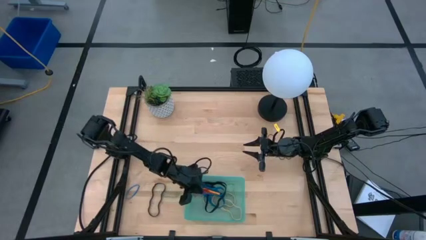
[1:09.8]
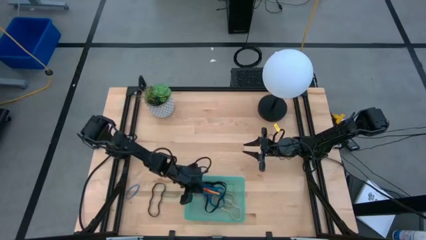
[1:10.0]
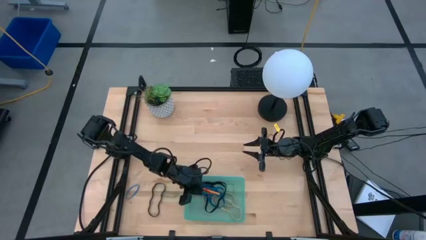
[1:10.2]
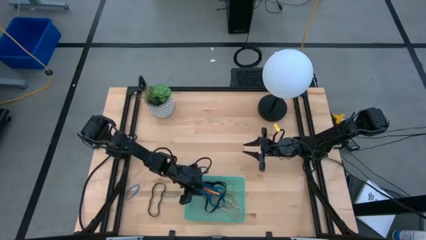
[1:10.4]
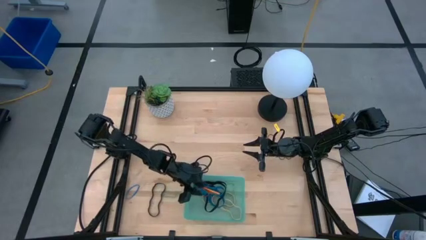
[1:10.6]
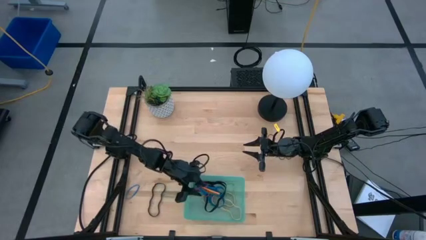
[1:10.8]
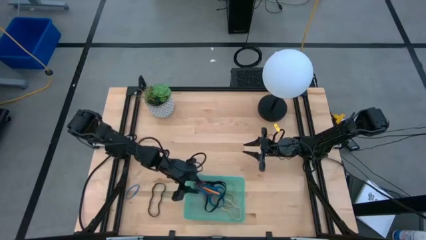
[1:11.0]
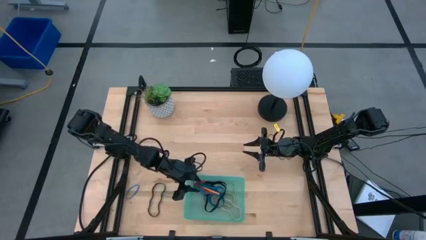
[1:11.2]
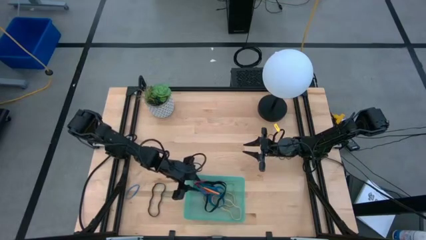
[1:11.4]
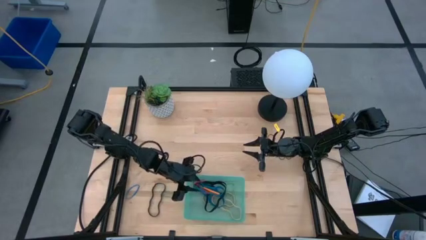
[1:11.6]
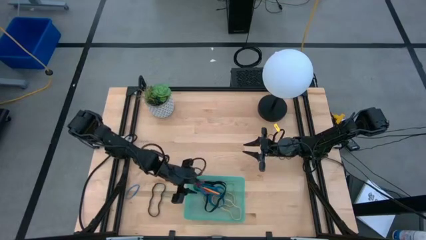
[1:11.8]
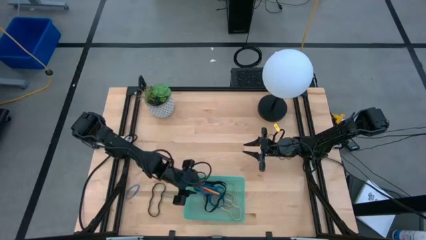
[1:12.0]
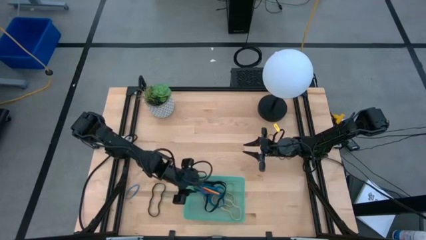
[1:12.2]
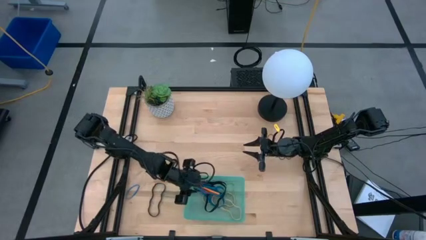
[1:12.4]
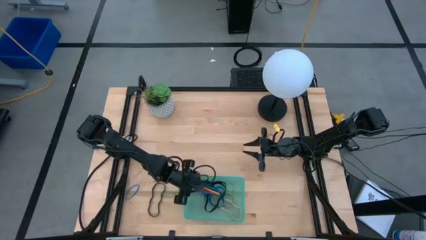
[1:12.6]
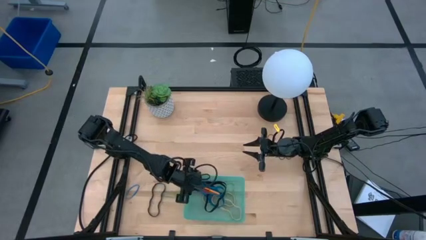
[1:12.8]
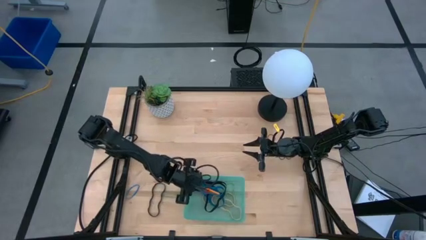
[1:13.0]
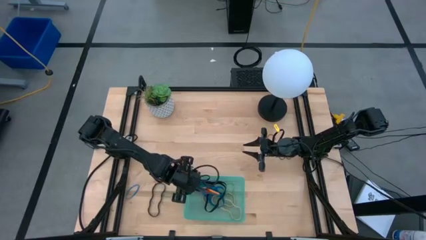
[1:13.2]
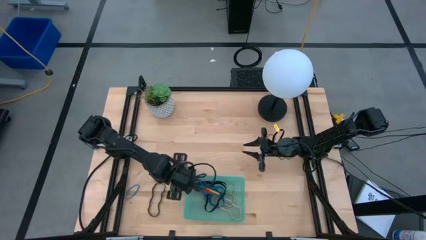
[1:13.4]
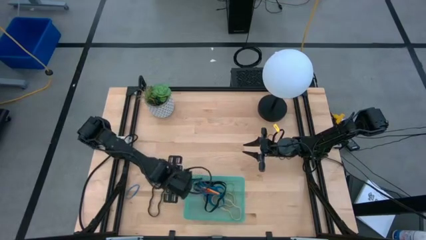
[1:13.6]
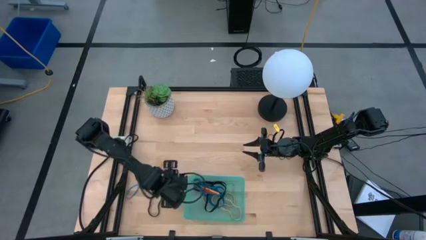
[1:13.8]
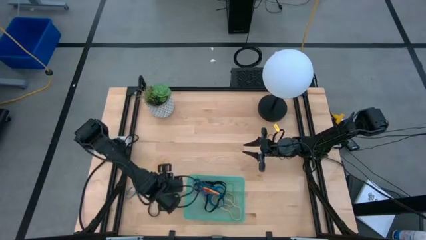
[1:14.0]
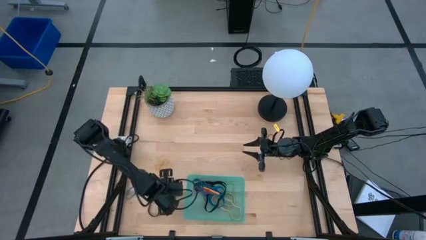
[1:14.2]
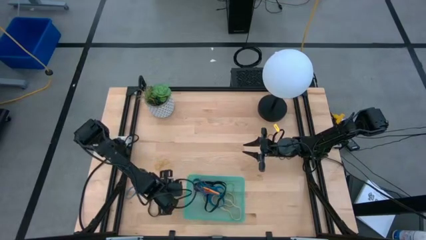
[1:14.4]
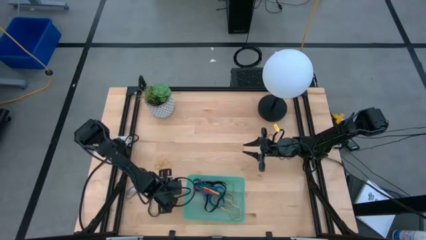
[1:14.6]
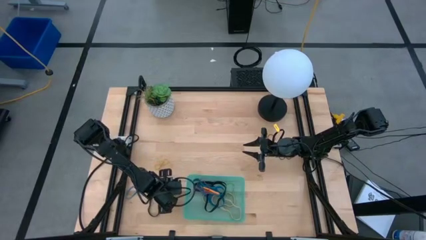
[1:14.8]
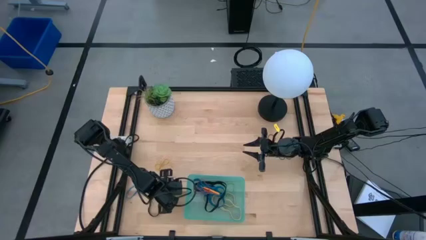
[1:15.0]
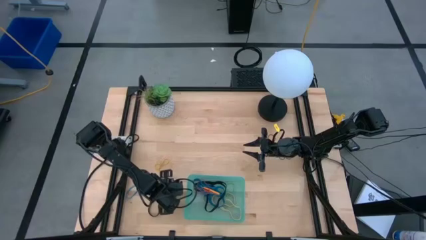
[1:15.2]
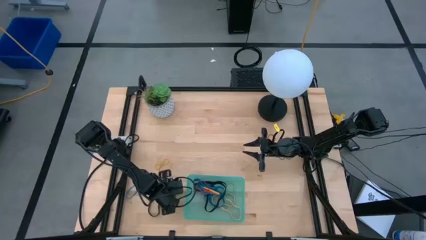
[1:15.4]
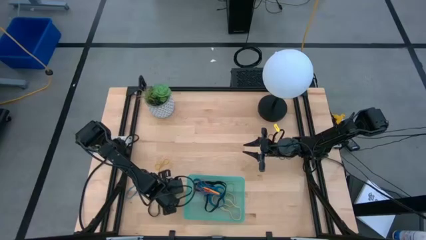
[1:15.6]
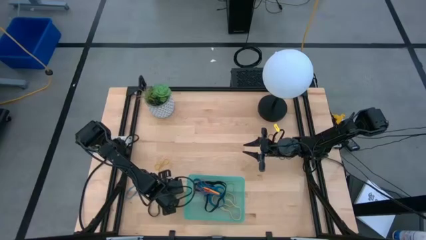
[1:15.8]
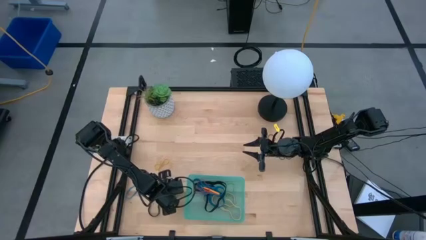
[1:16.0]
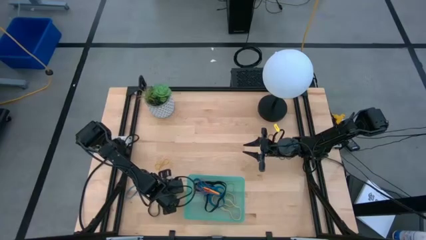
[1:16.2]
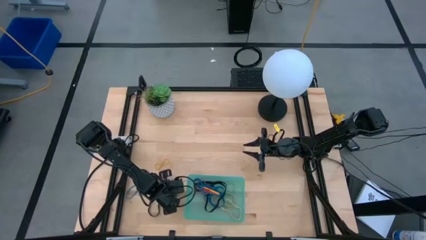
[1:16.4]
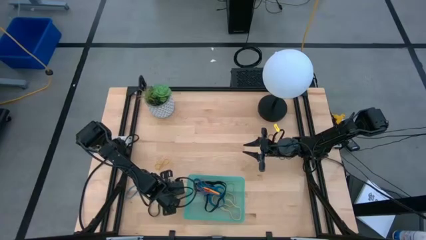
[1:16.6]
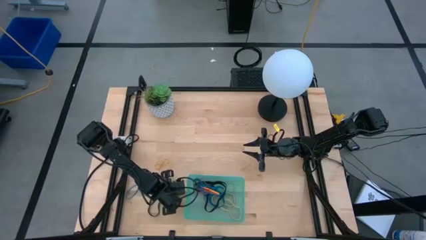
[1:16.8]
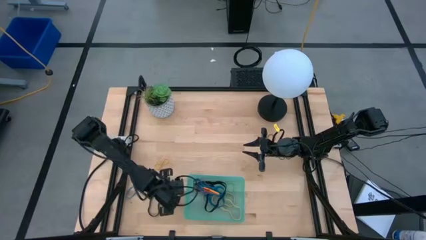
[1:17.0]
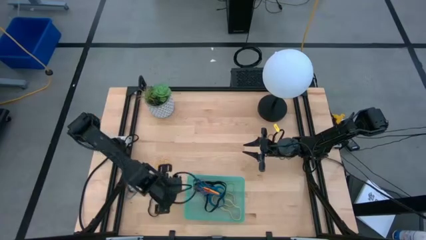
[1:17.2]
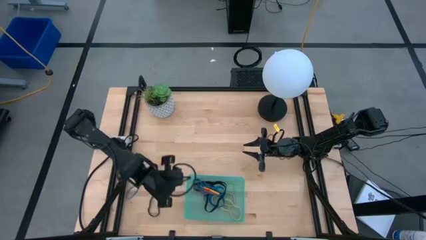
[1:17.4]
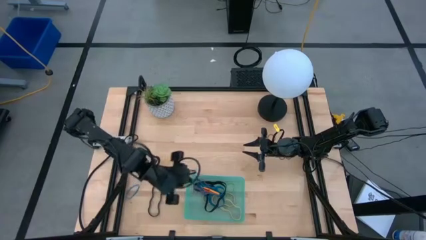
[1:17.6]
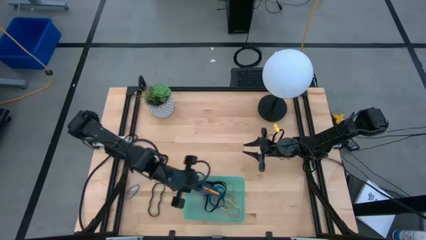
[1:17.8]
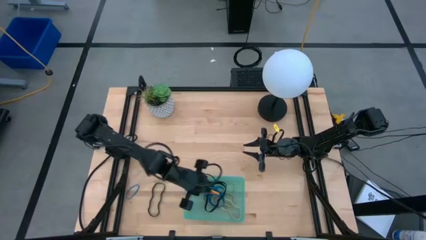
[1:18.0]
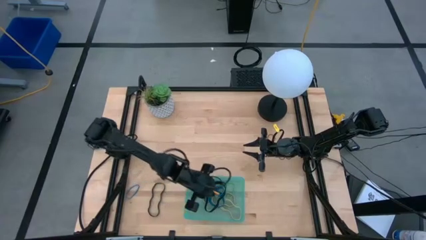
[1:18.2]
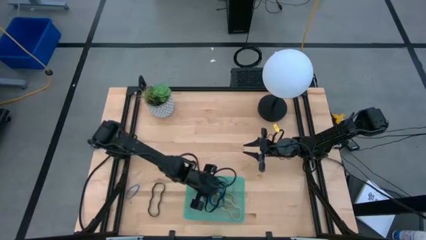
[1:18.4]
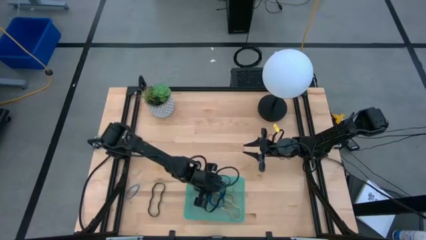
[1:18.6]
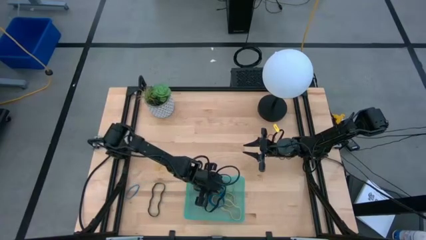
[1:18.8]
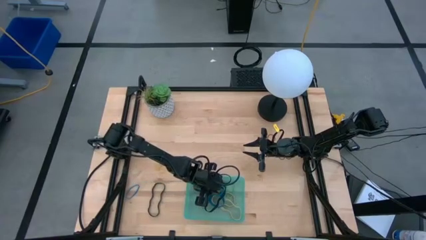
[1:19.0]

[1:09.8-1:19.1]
Task: Pick and place rubber bands into bin
Put the small green rubberband into the green bin

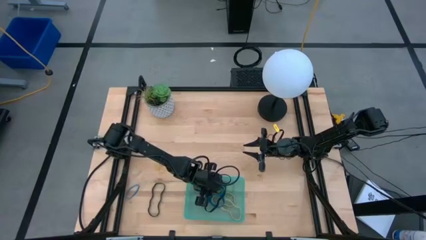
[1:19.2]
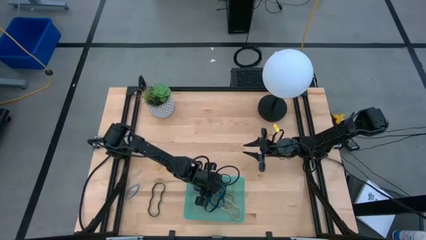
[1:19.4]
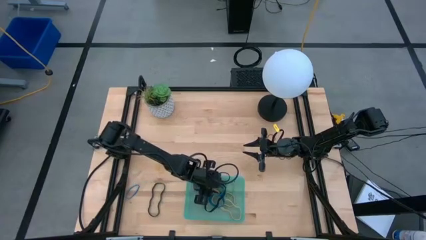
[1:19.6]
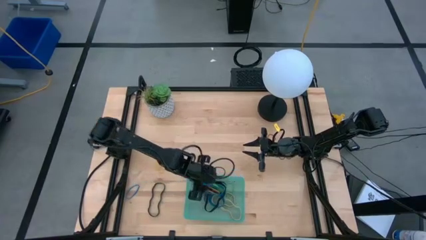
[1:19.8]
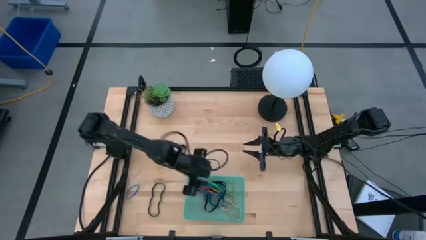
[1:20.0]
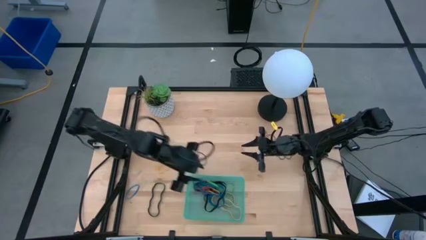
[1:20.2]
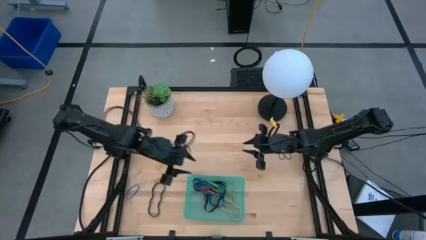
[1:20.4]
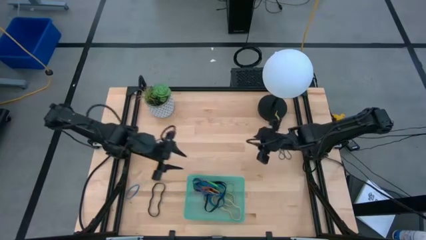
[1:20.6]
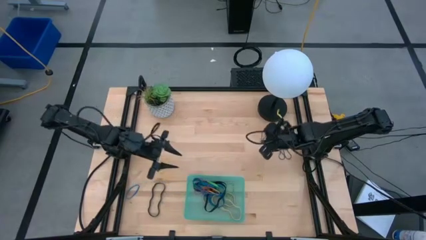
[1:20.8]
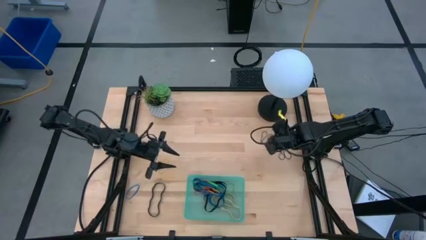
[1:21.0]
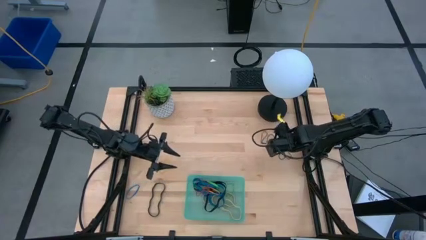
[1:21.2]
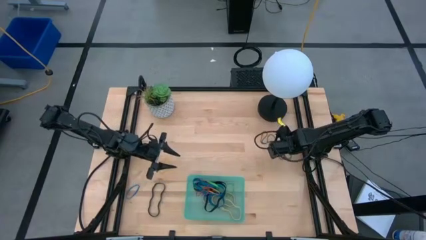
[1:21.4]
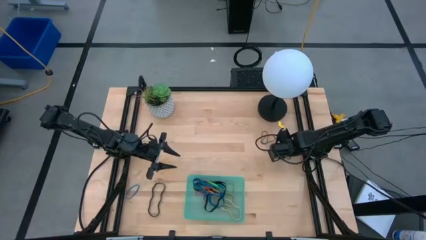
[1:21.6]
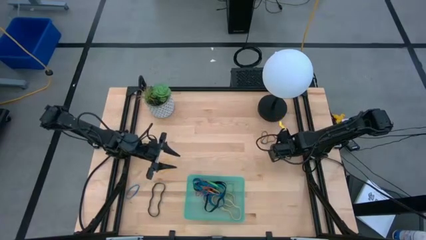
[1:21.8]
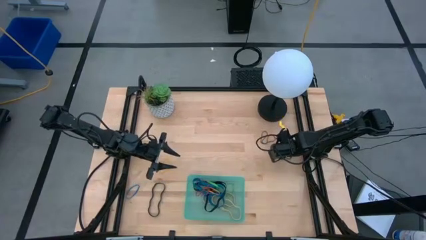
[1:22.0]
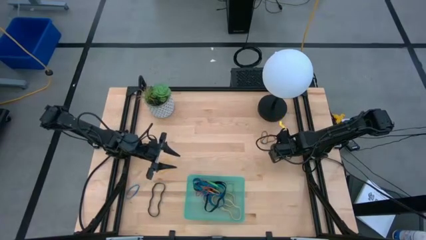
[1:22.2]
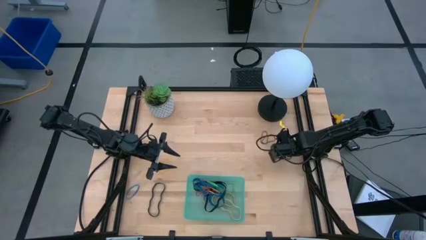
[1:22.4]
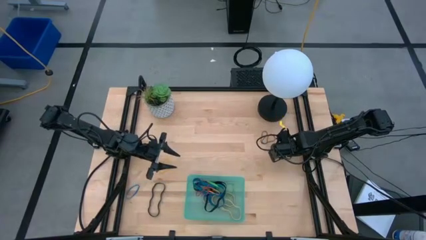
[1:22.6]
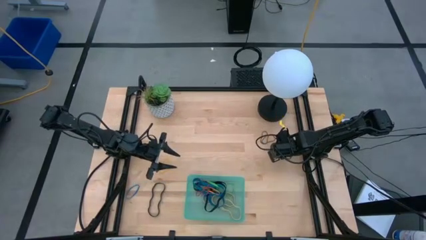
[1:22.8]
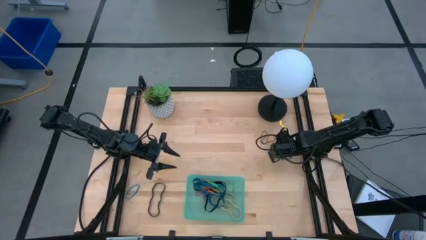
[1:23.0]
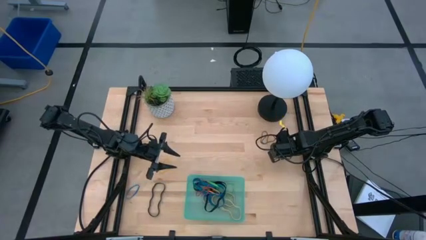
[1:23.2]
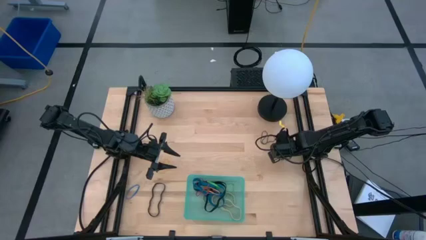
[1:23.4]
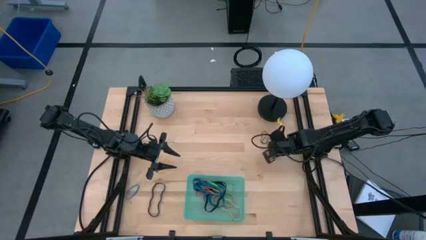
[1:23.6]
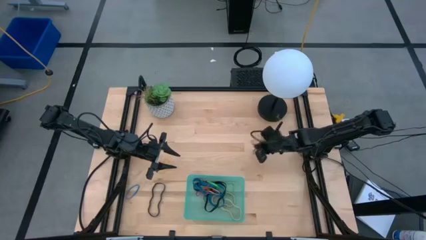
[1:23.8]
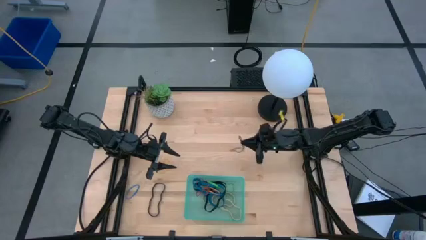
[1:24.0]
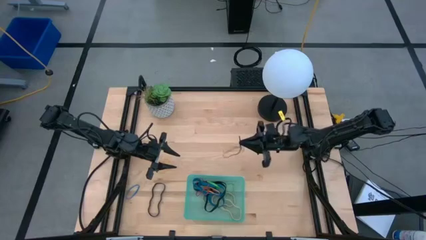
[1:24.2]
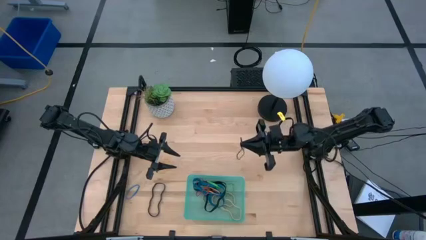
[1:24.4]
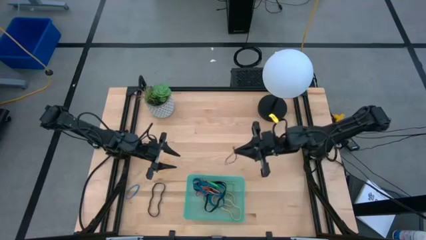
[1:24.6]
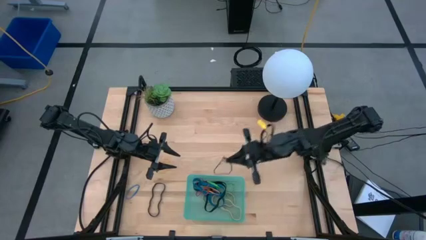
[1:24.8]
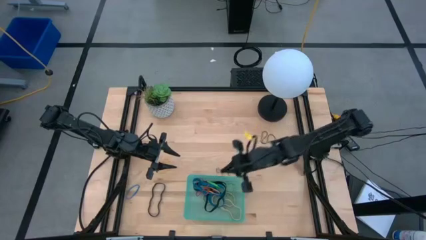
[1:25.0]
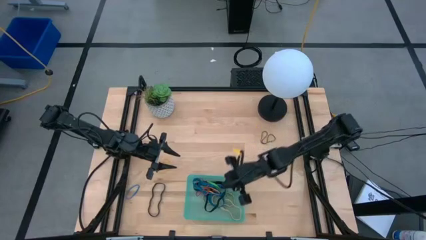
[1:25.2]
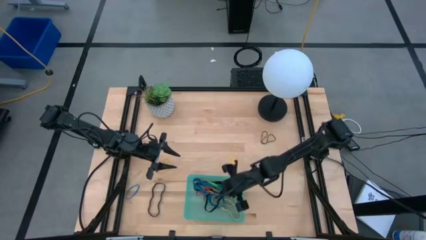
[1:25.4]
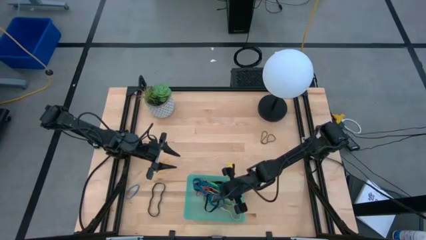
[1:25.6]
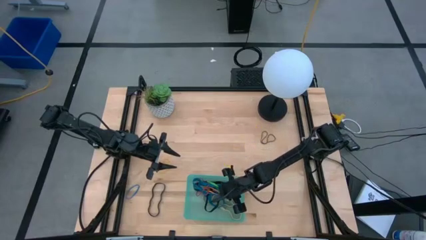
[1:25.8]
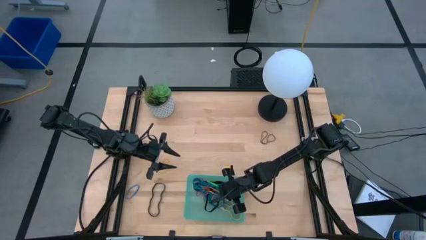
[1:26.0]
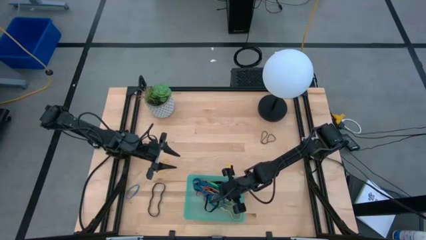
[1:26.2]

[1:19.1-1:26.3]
Put the bottom small violet rubberband into the green bin
